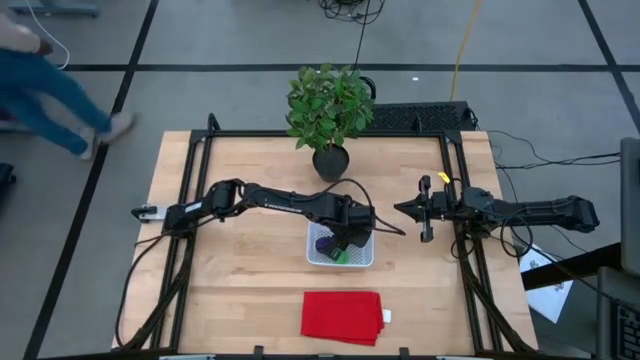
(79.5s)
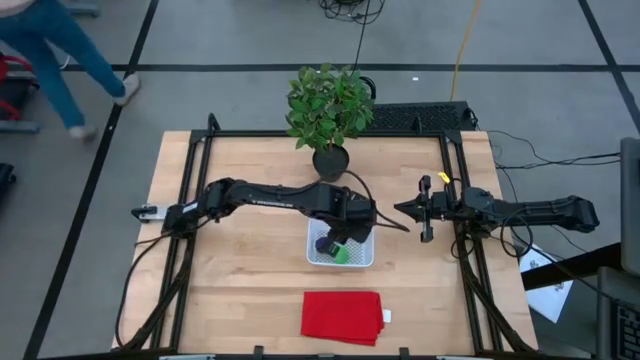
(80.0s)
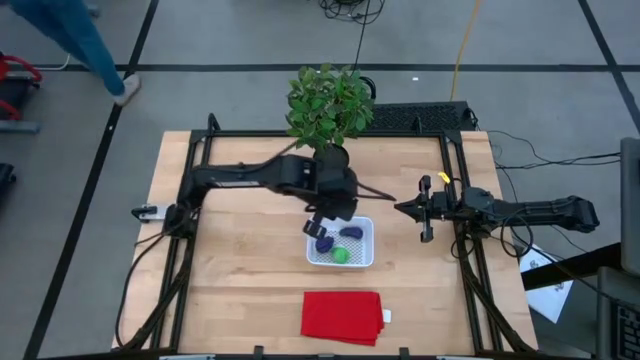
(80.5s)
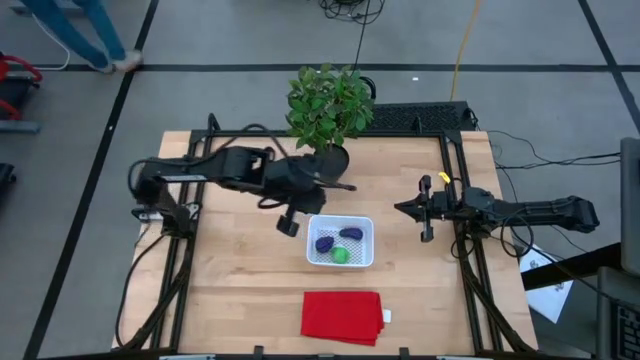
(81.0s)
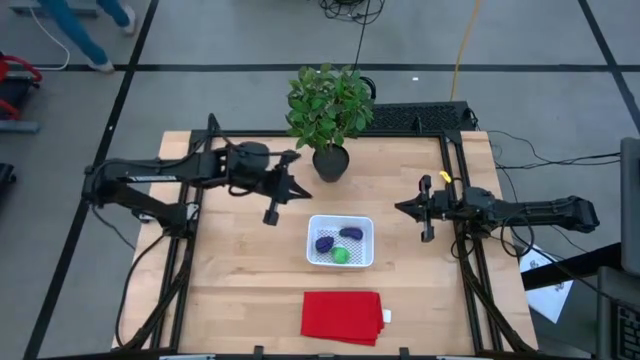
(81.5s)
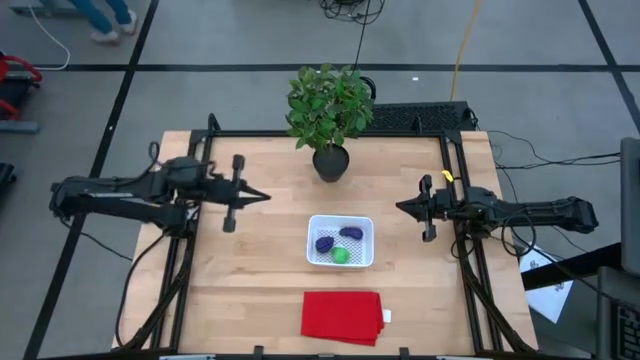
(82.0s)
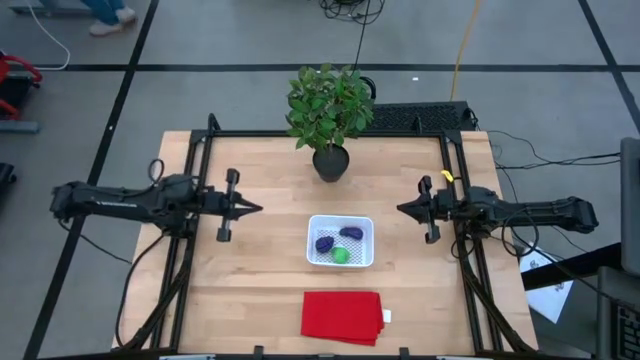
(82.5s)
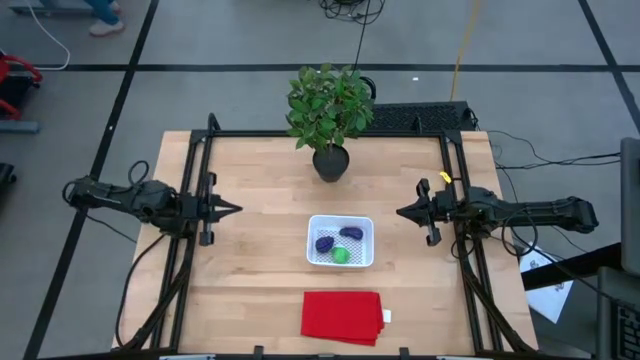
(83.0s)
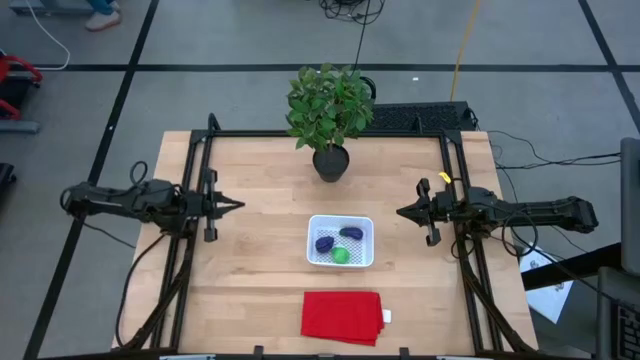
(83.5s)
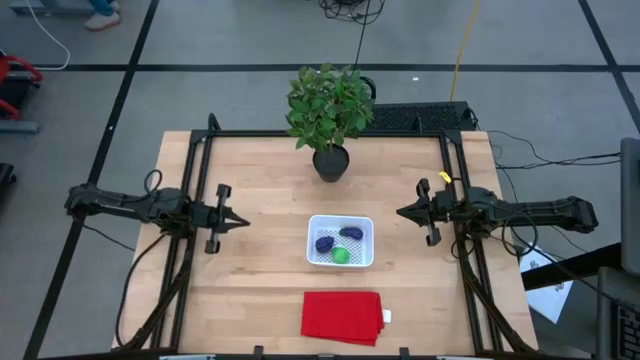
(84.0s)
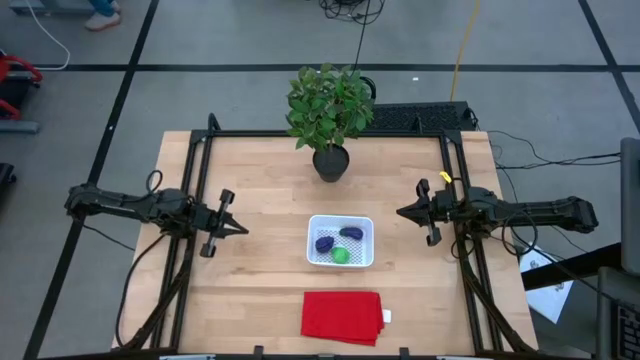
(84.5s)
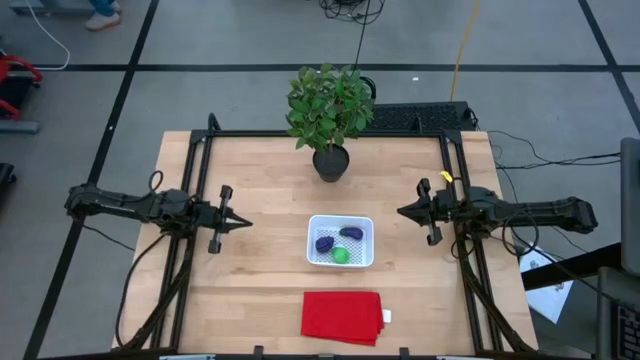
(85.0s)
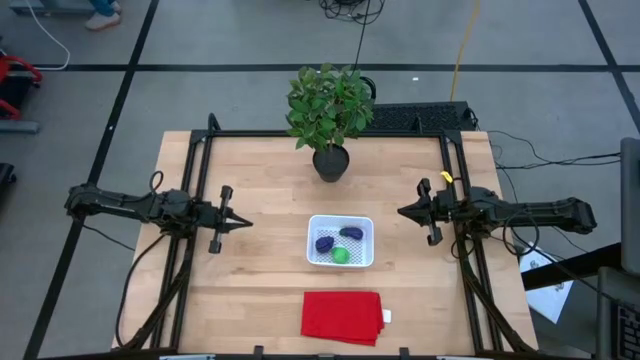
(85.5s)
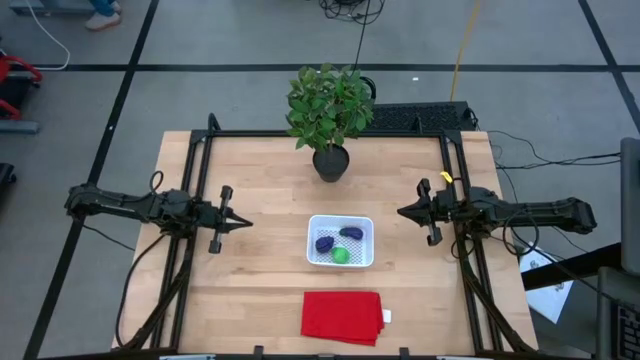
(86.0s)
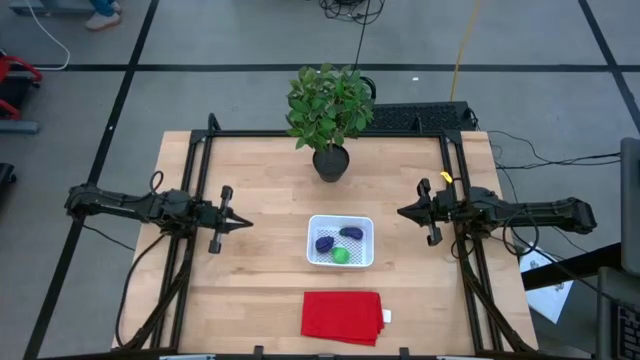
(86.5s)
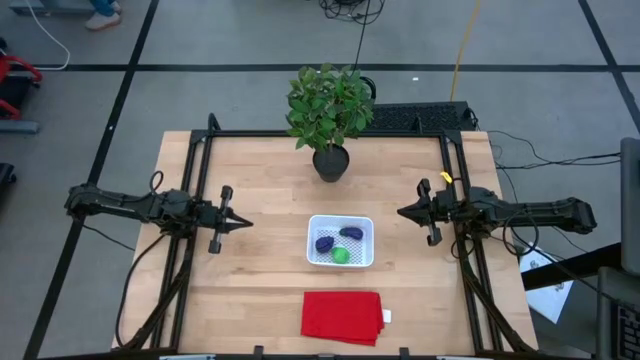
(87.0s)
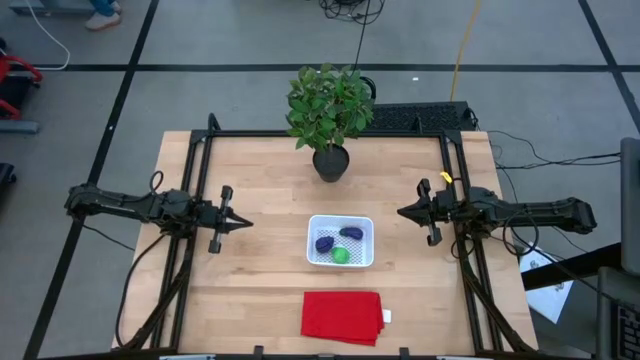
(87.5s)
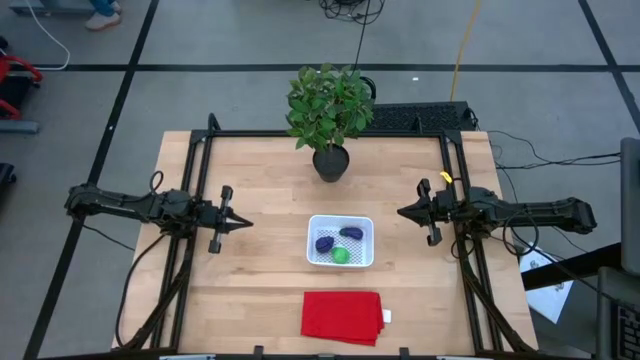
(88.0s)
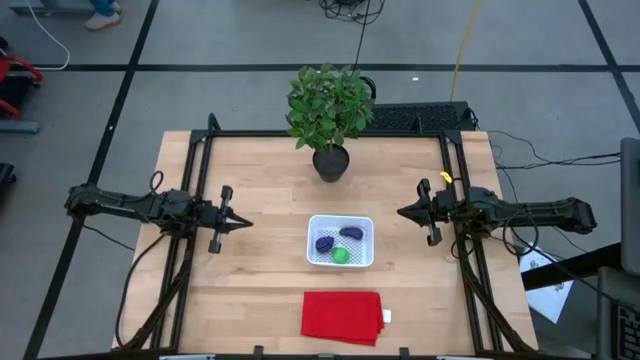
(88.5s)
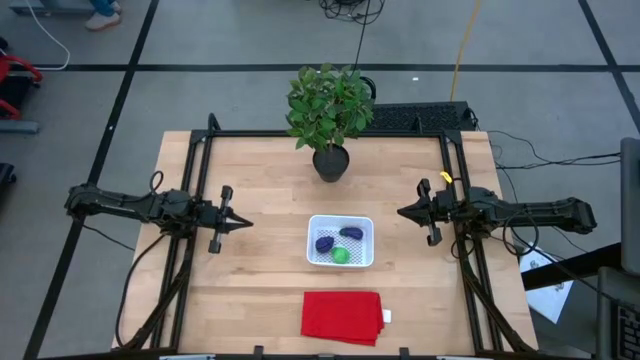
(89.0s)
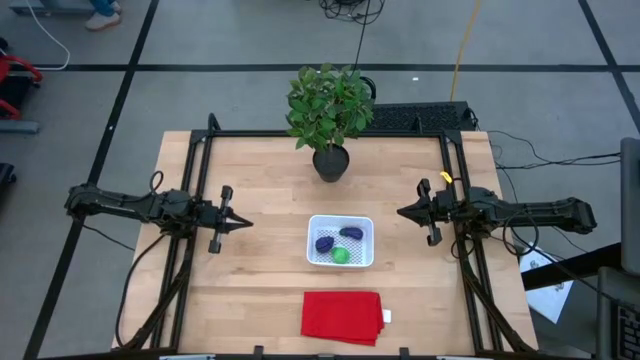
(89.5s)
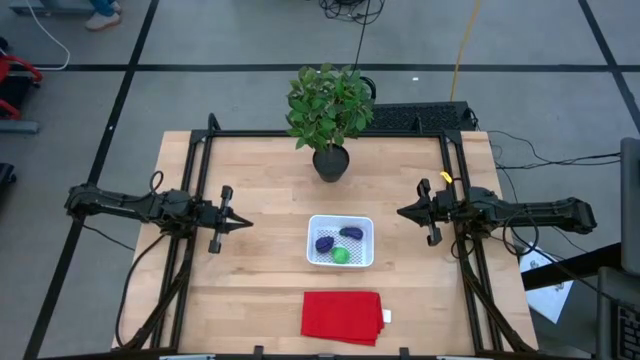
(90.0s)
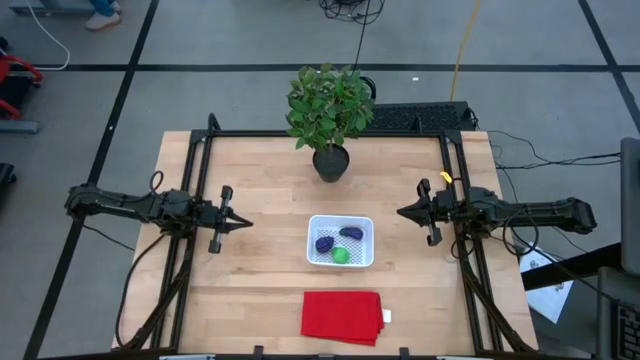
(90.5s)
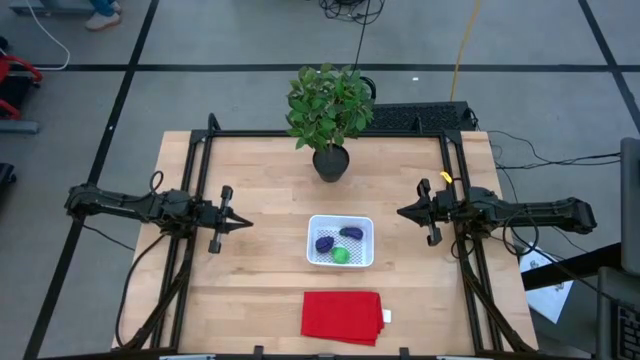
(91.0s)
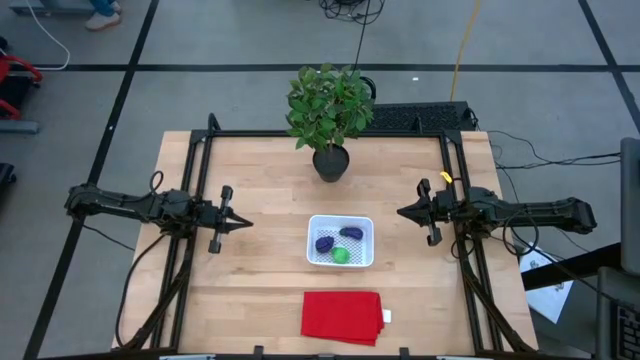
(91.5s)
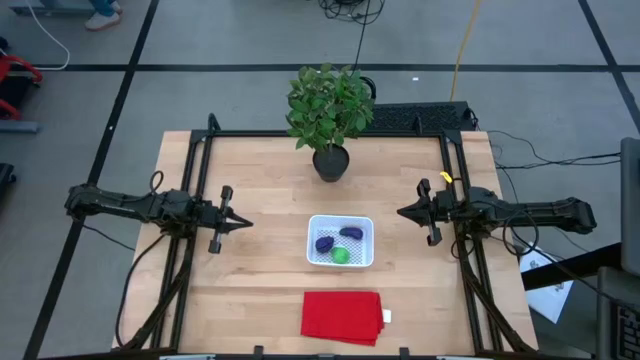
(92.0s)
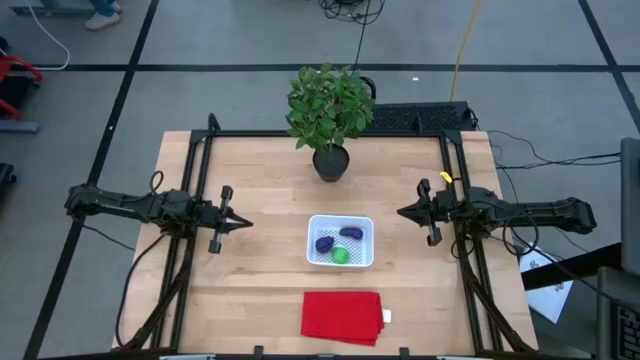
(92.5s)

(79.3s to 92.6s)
Task: Pick and placing Produce into tupperware
Return to Home Position

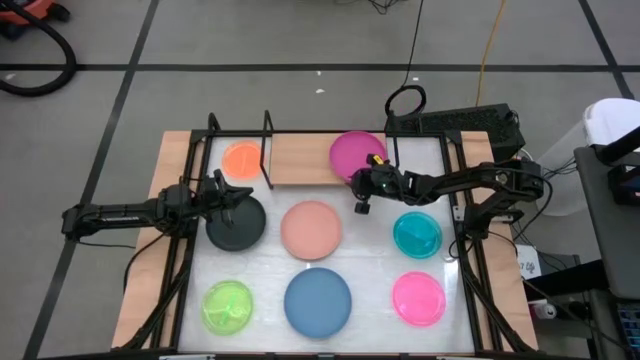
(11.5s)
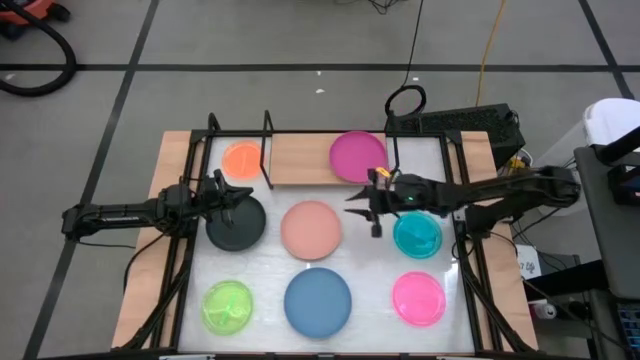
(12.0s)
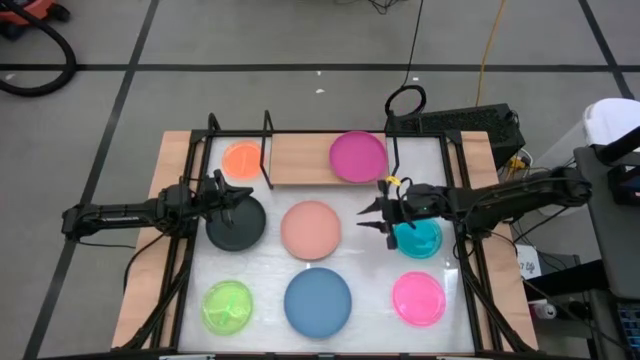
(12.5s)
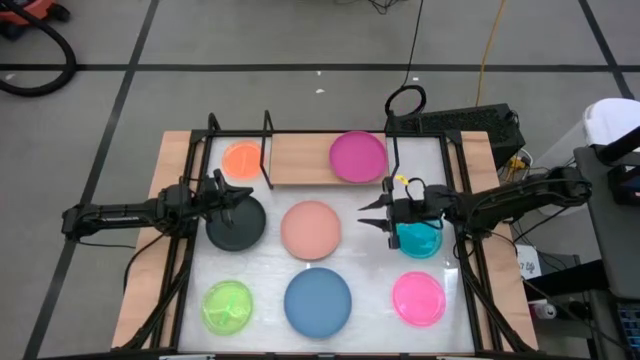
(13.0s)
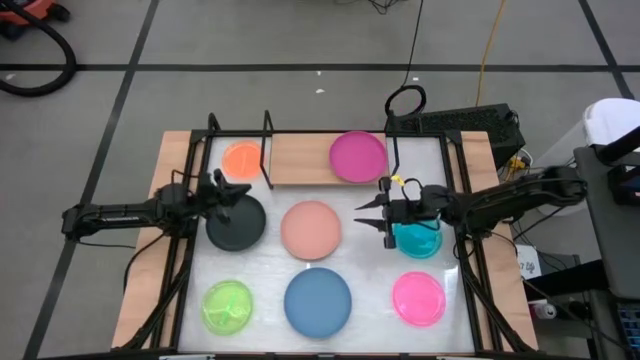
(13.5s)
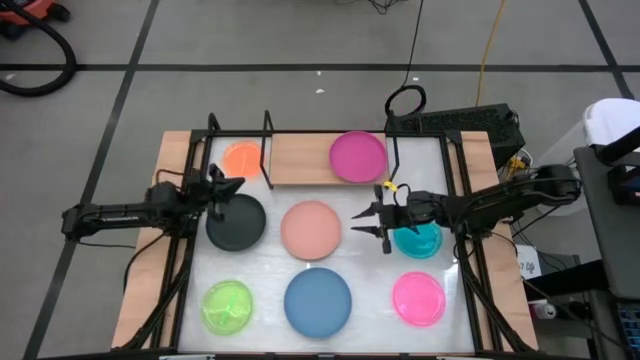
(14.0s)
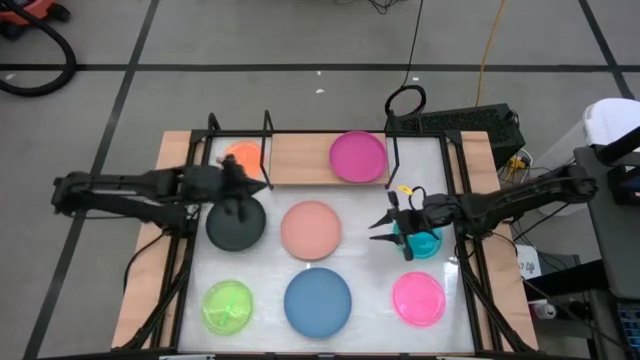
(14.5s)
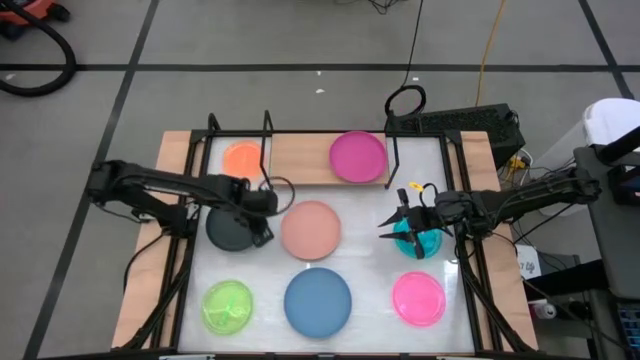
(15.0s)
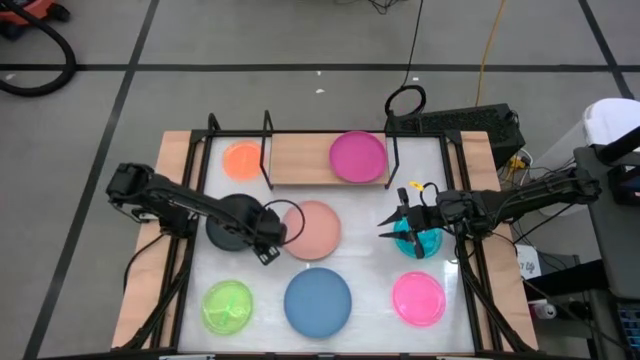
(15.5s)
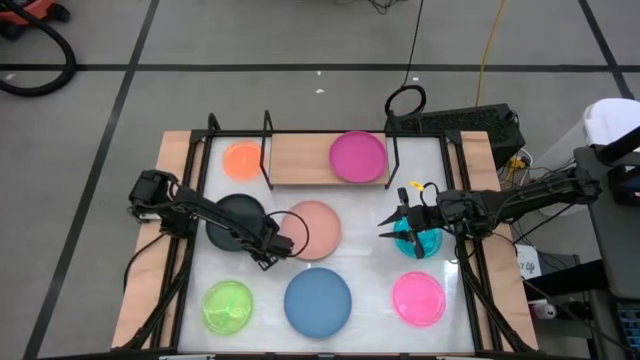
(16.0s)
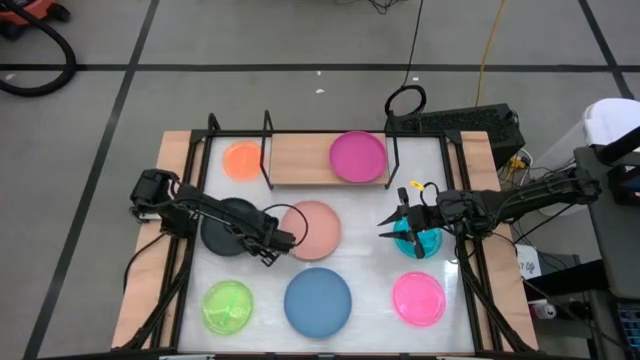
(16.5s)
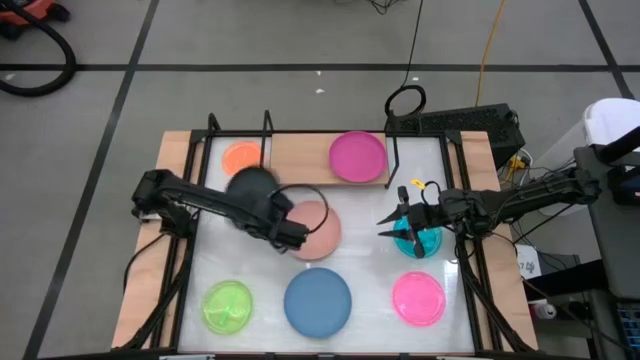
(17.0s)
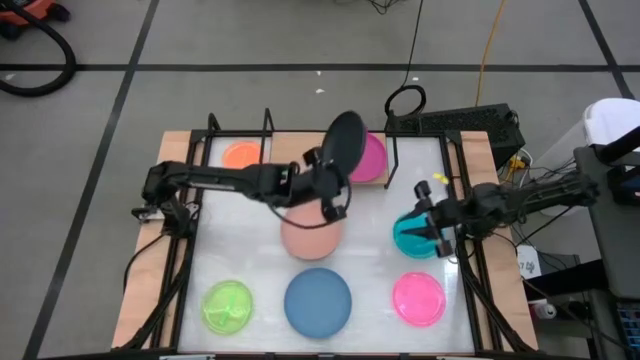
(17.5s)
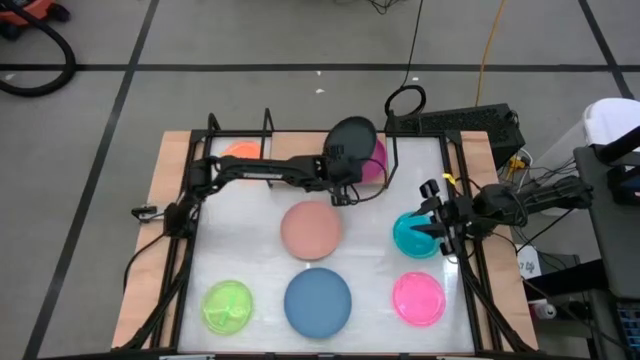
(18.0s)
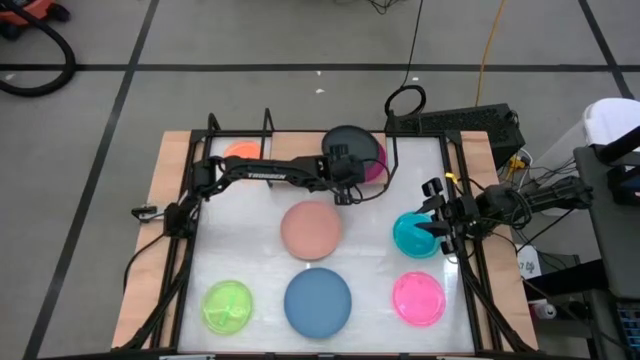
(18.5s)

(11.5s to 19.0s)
Task: Place and stack plates onto a shelf
Stack the black plate on the pink plate
